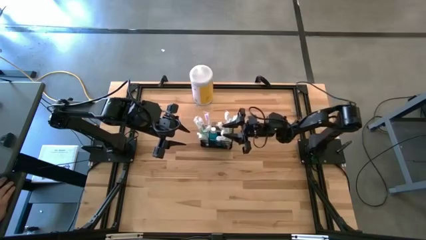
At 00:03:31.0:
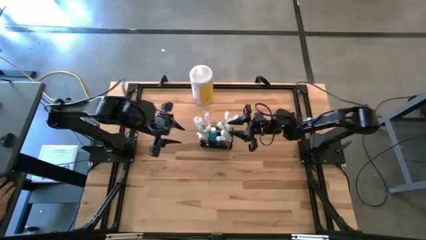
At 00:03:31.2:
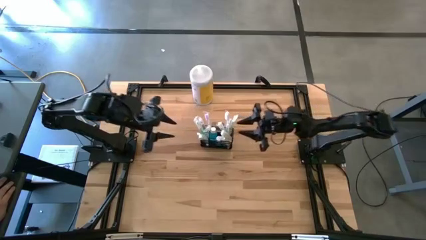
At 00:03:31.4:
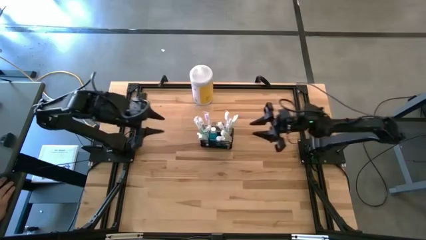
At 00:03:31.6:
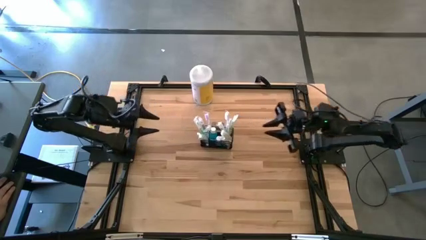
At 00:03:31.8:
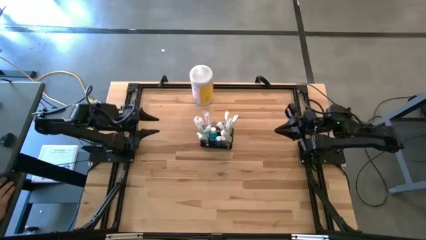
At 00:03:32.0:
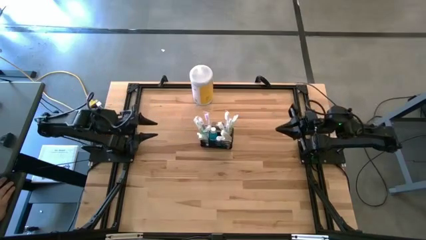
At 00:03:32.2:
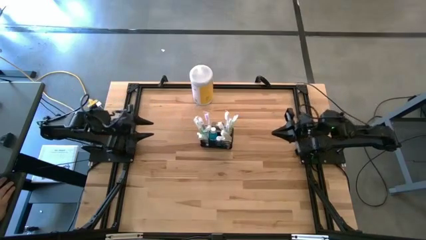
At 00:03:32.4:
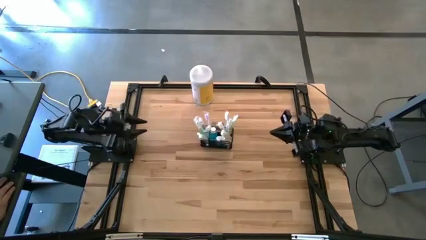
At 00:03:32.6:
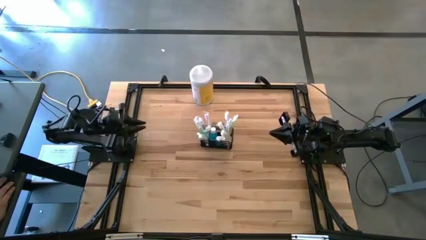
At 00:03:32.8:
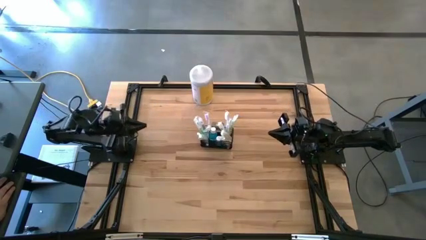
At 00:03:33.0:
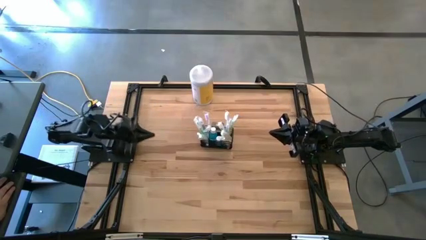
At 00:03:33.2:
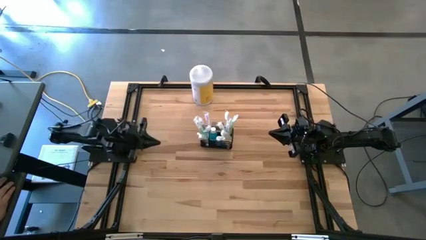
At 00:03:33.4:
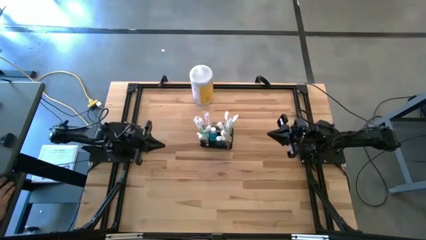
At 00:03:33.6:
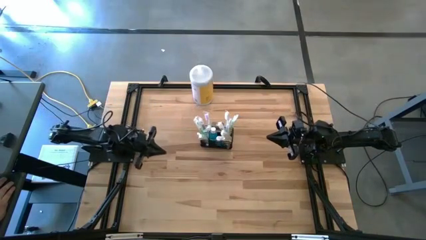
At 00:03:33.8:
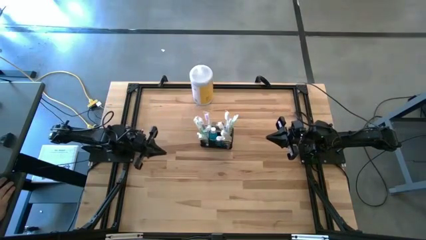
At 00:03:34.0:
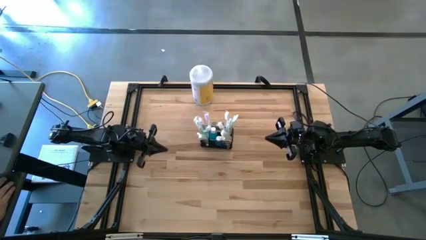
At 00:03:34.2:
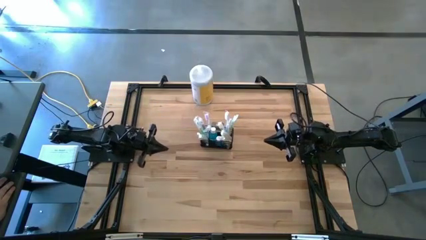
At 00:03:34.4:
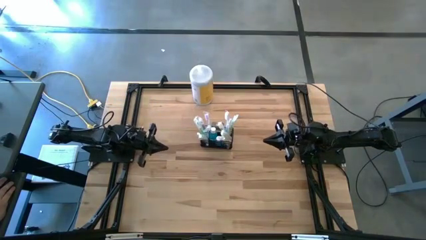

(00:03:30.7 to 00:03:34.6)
Task: Pick & Place toothbrushing station
Return to Home Position

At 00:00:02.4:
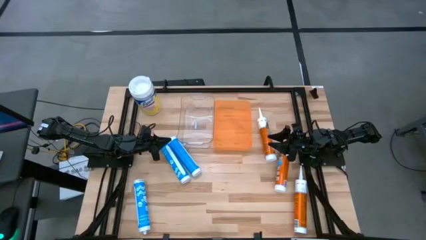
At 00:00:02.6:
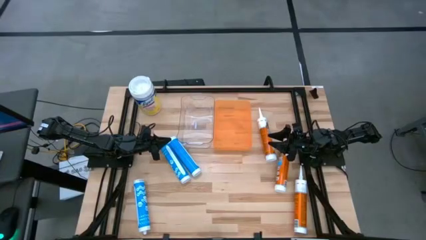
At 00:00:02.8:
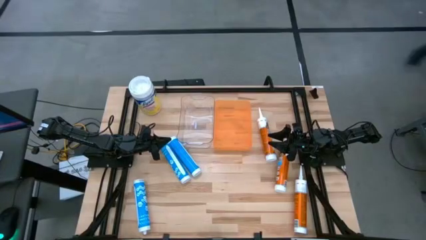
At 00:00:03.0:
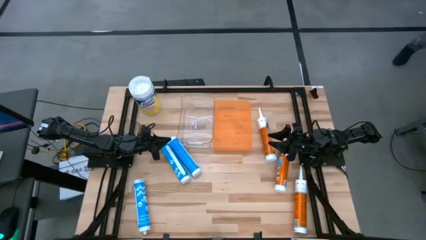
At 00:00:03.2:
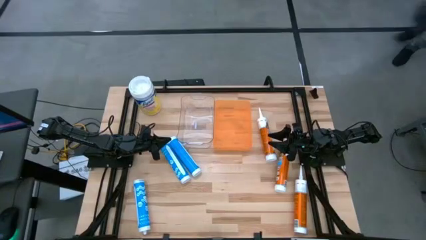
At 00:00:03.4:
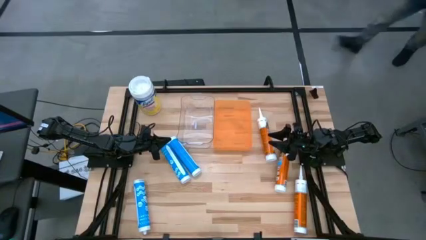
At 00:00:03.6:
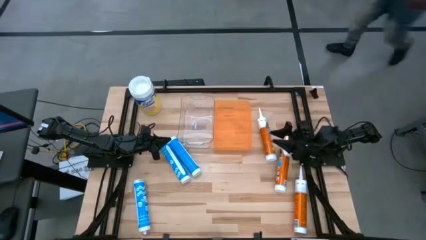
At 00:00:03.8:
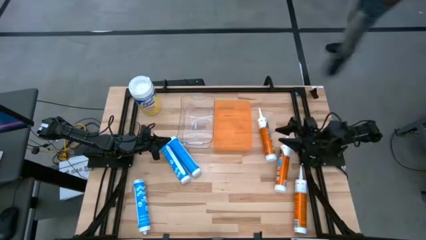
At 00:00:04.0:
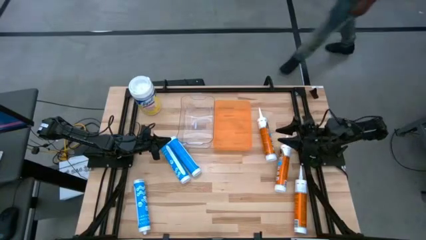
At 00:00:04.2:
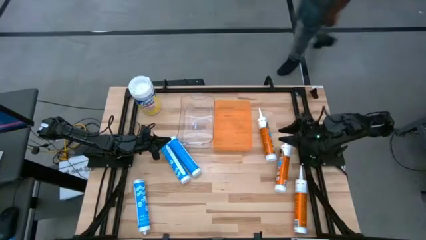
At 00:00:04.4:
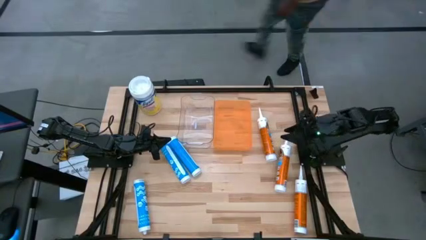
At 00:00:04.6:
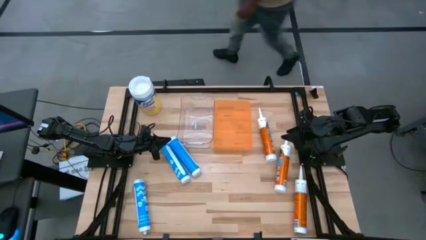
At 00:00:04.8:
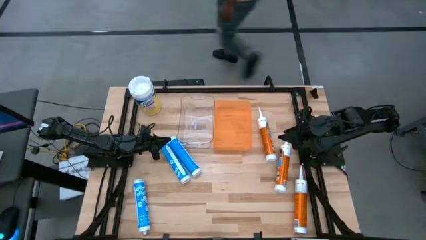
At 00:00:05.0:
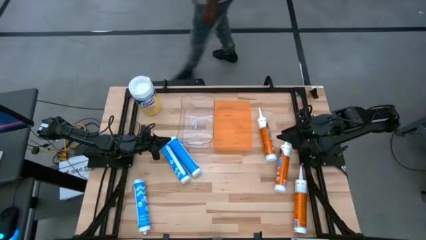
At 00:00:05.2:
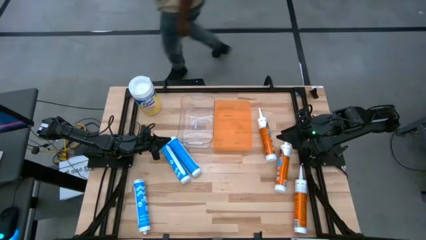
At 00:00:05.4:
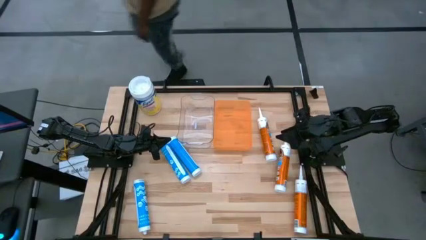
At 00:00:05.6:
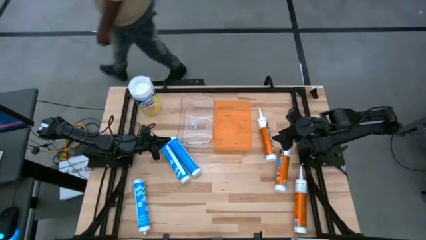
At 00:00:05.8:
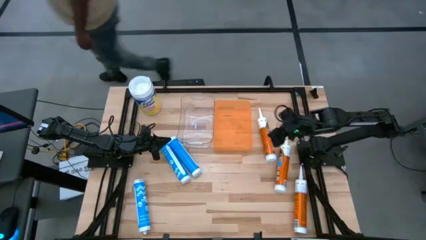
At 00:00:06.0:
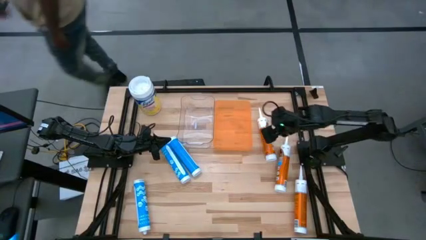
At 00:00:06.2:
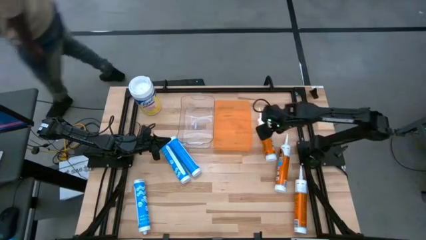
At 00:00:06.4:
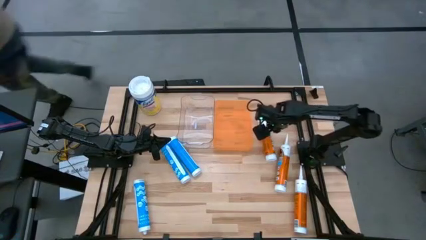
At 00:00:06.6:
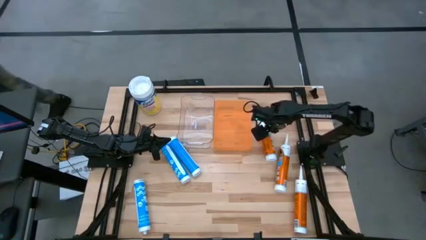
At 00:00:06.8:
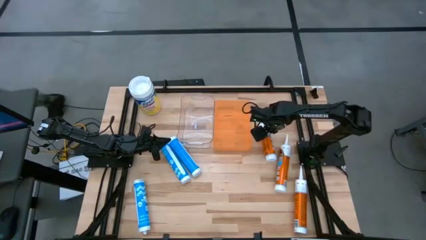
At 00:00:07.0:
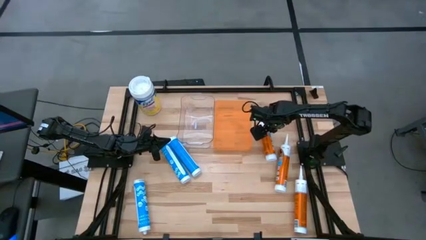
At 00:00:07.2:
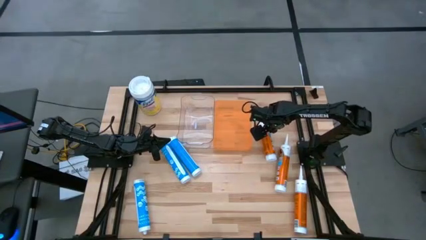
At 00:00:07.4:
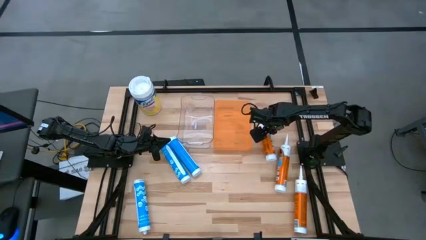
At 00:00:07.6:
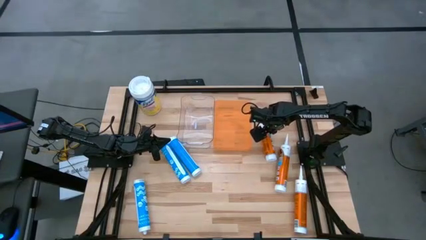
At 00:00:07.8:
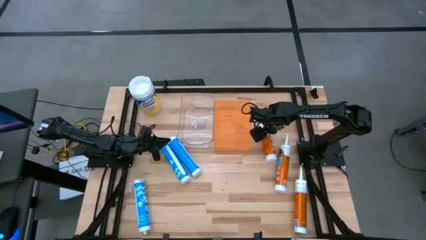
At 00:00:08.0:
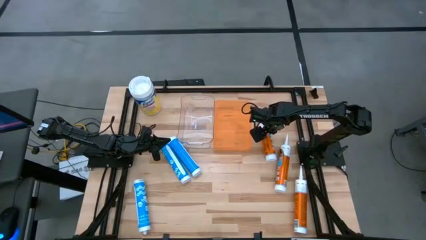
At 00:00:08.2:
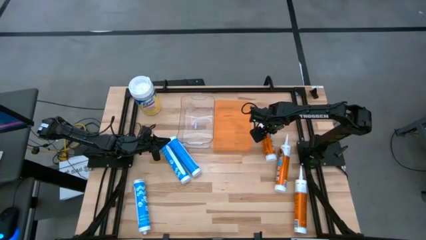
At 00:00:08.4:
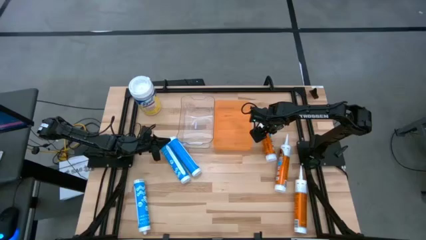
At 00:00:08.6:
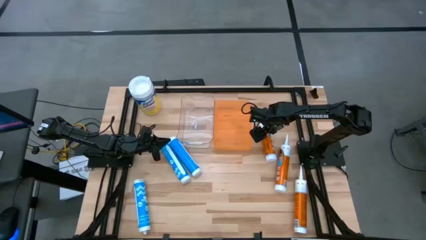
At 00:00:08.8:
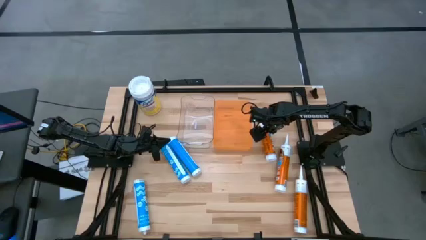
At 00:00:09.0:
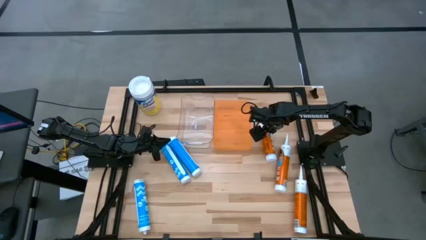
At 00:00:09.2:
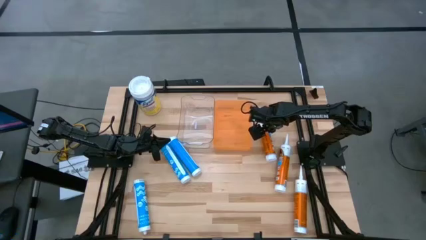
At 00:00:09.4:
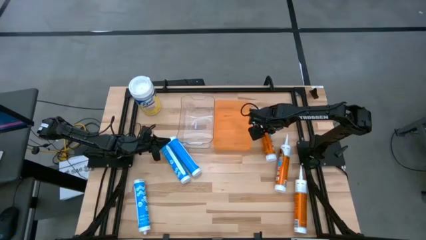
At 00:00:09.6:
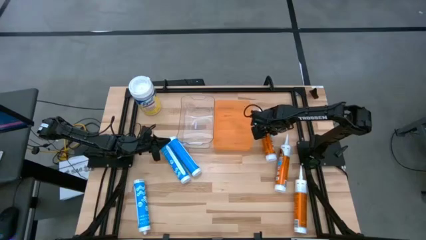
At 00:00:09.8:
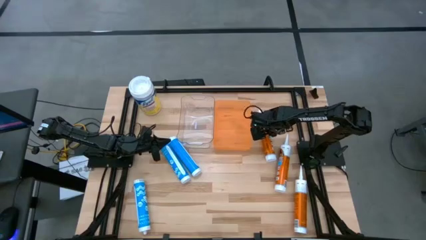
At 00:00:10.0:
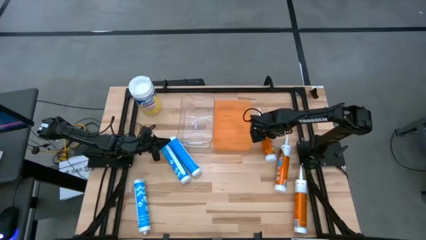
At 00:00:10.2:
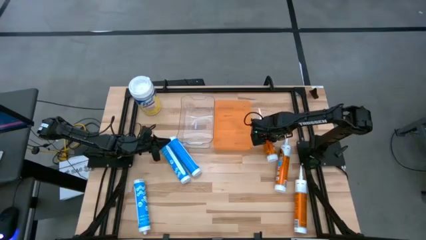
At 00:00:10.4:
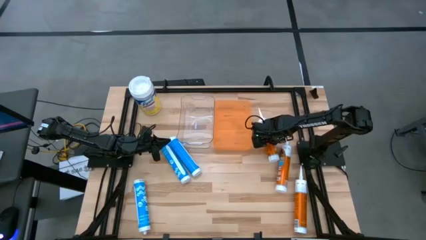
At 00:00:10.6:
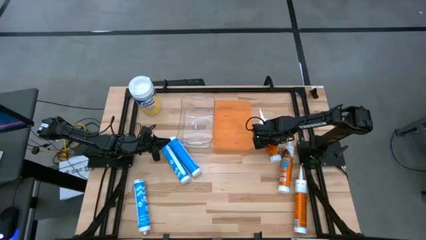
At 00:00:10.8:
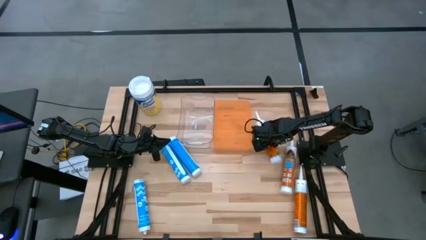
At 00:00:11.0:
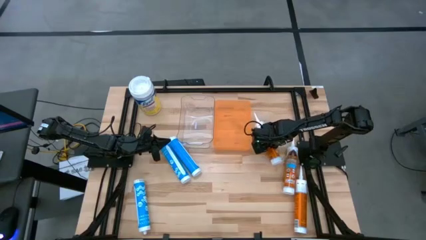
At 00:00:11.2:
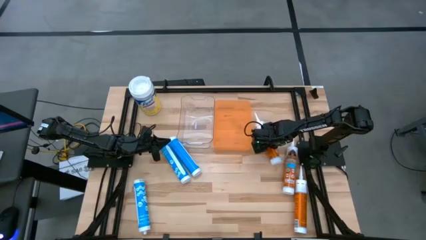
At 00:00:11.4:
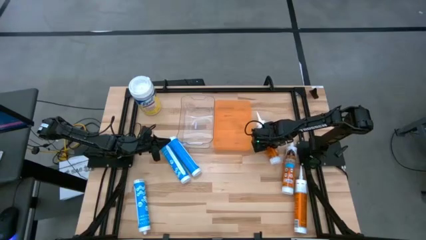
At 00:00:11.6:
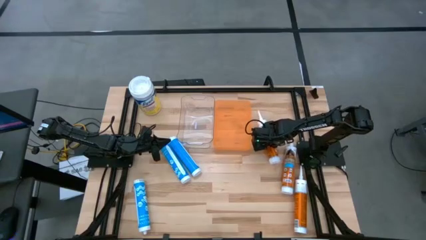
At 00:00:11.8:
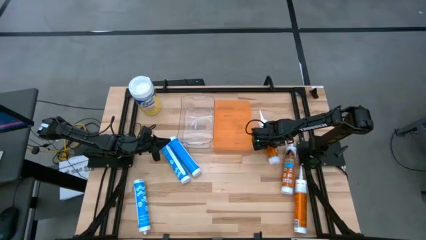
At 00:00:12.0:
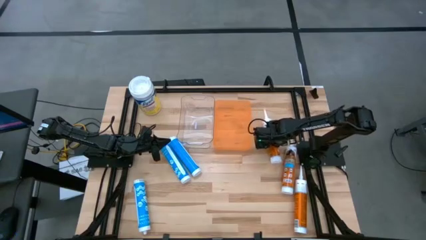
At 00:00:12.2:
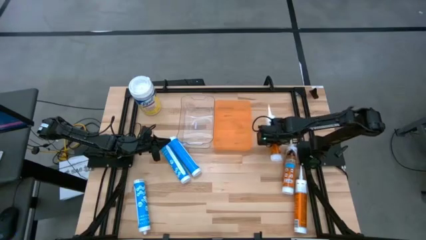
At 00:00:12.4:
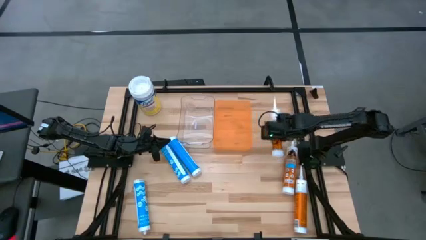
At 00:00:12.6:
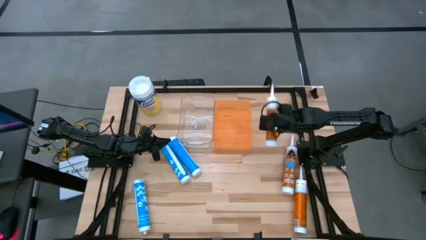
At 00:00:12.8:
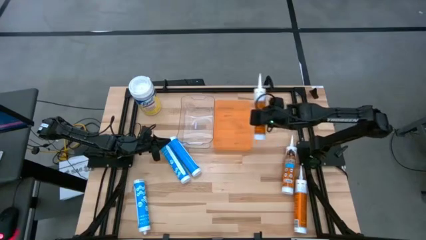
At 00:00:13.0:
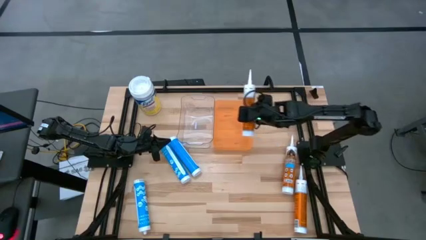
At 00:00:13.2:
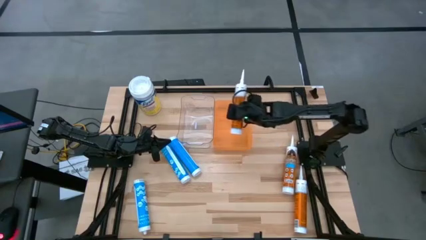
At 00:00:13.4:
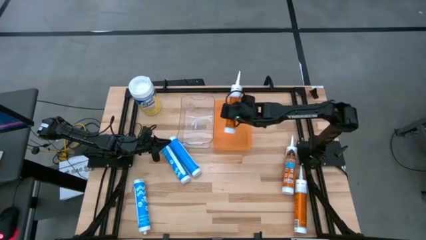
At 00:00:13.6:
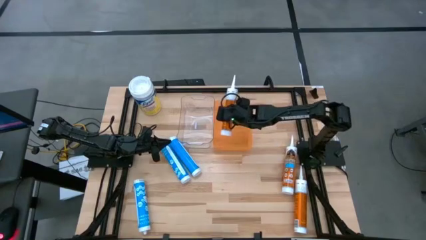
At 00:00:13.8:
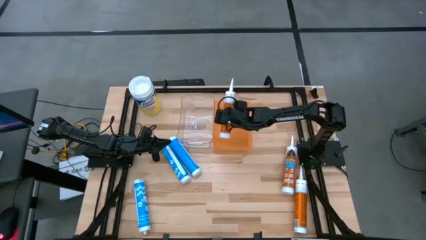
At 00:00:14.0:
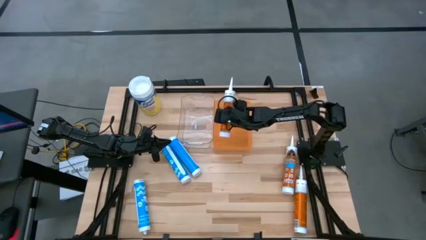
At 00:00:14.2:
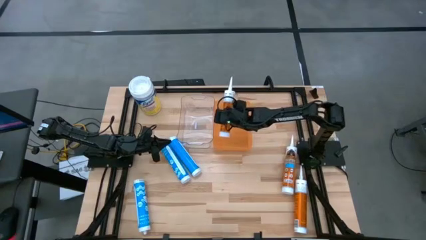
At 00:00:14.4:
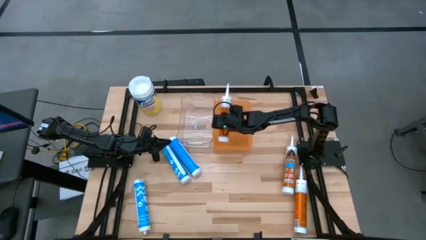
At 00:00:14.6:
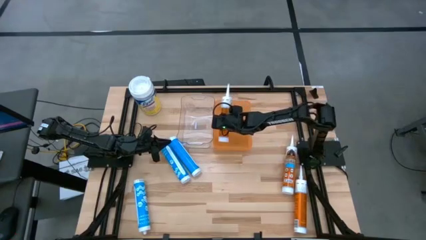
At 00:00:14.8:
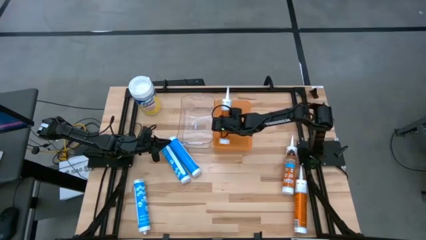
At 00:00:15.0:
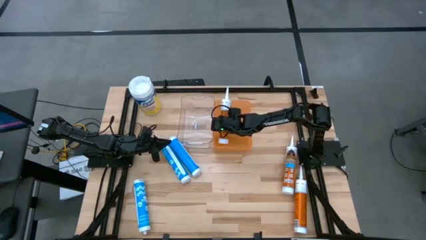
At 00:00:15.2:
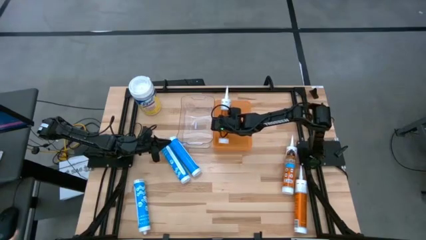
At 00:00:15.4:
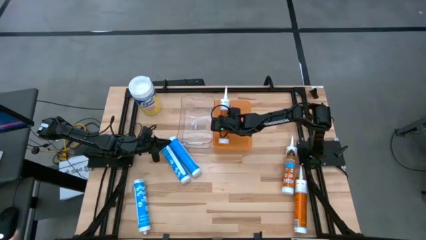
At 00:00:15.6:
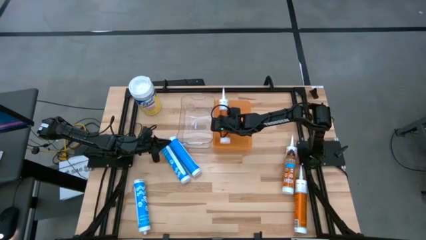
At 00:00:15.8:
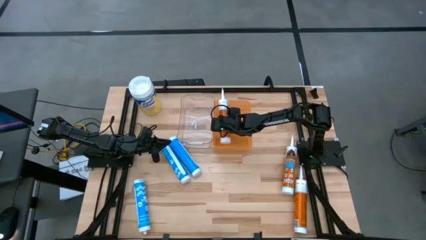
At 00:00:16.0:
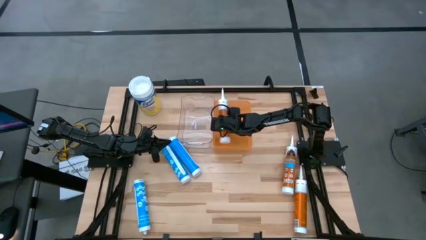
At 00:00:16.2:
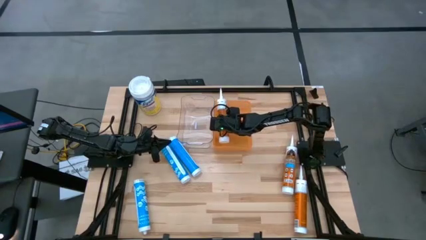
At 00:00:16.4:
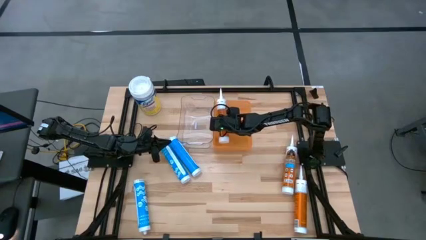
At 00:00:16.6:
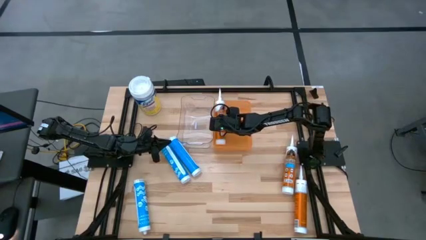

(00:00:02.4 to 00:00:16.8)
Task: Pick & place silicon tubes, Sealant and Lysol wipes
Put the top orange sealant into the orange bin
